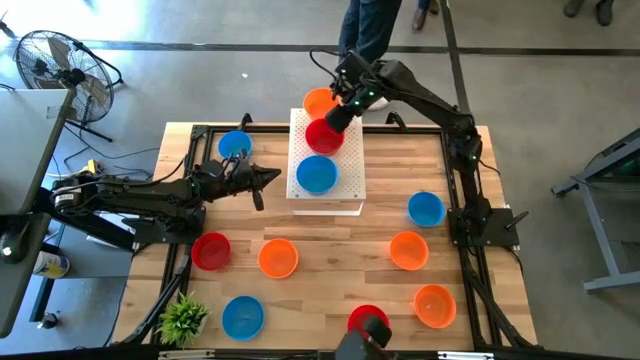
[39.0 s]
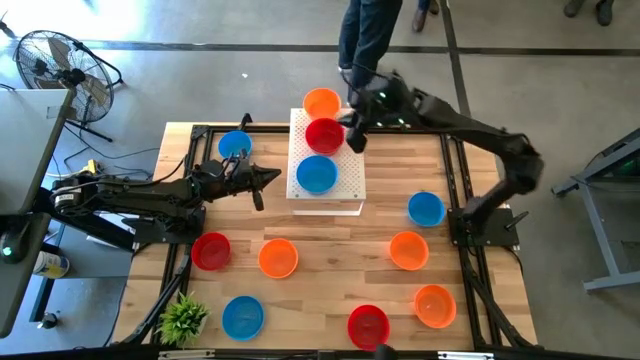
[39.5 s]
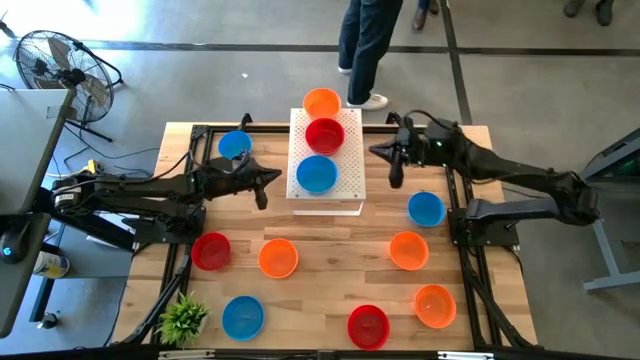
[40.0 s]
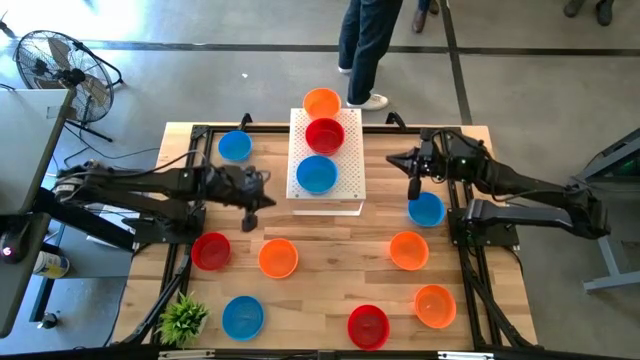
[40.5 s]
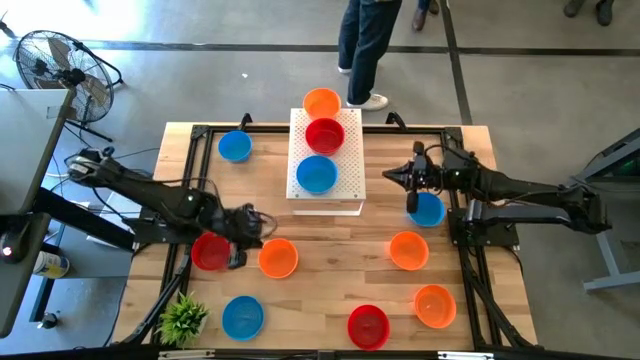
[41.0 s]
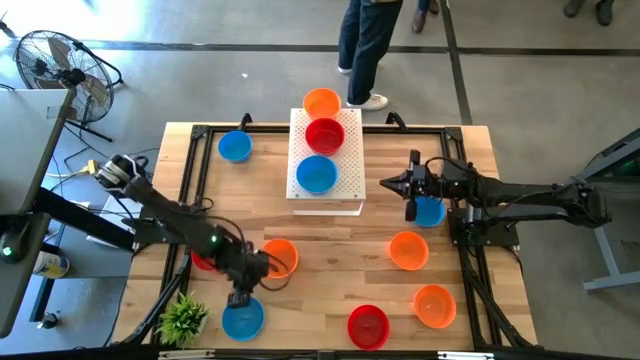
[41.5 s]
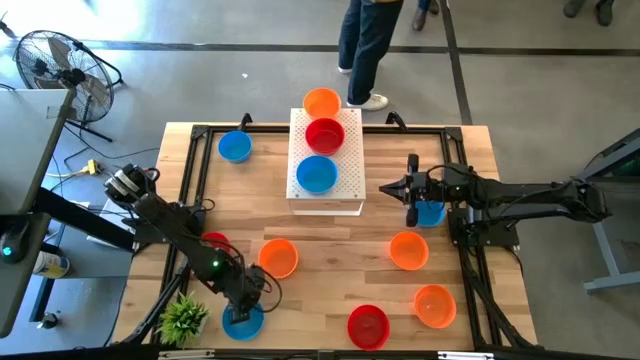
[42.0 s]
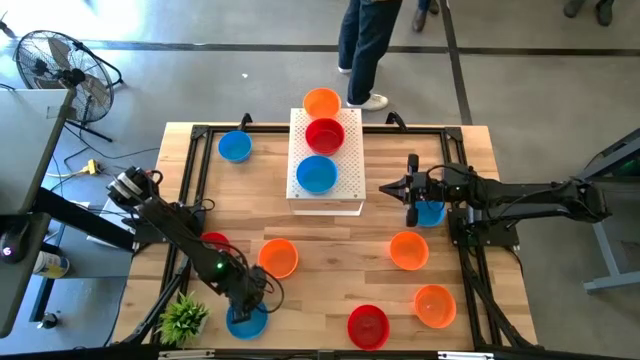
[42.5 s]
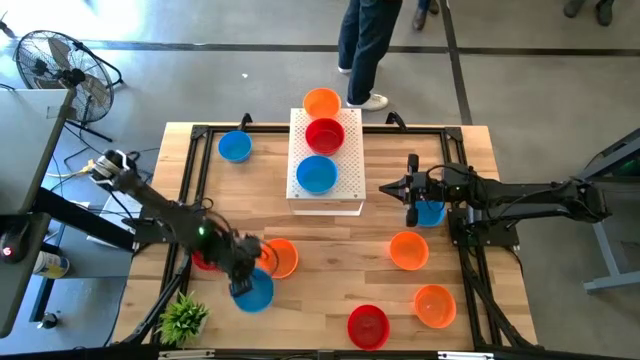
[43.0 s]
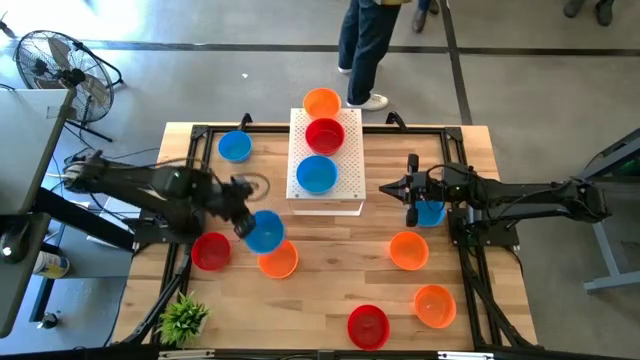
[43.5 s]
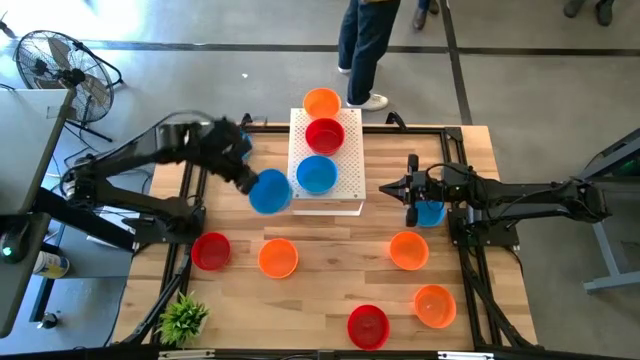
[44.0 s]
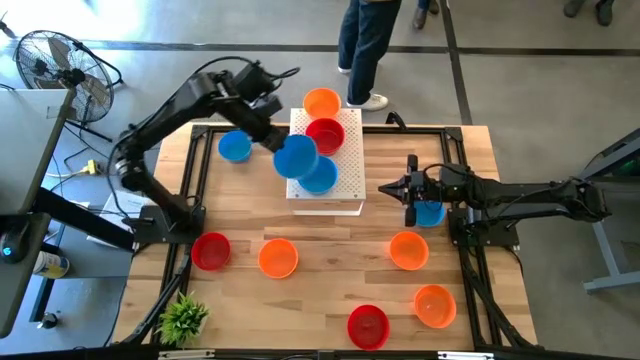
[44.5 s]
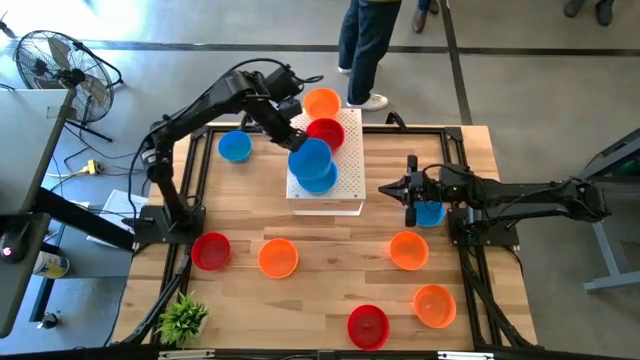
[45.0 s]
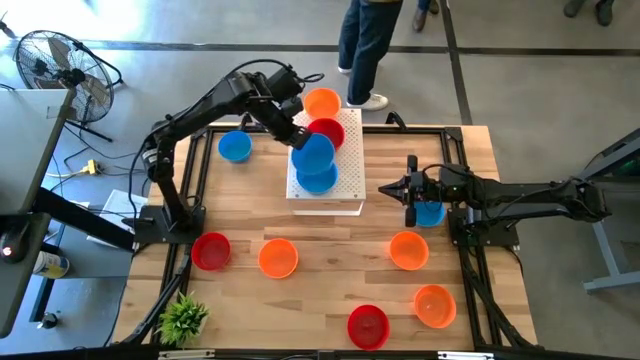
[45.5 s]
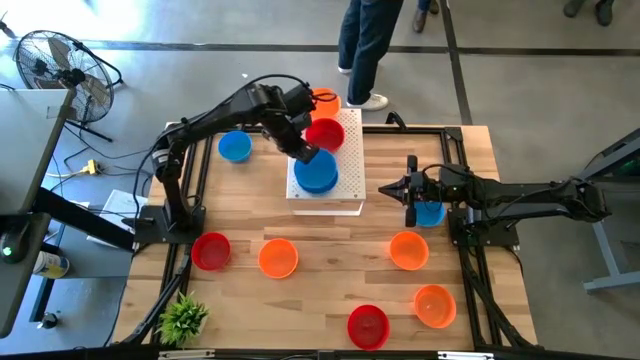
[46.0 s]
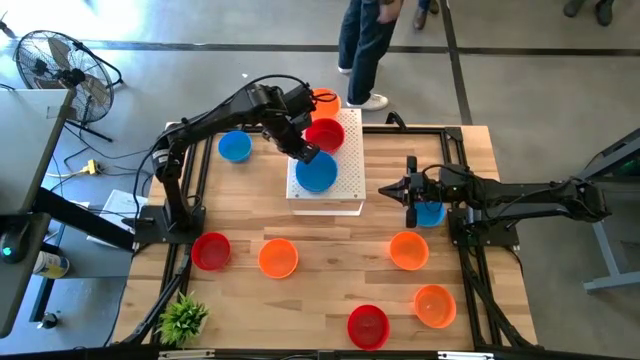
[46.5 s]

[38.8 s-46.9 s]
Task: Pick & Place Mini bowls
Stack the blue bowl on top of the other blue bowl on the shelf

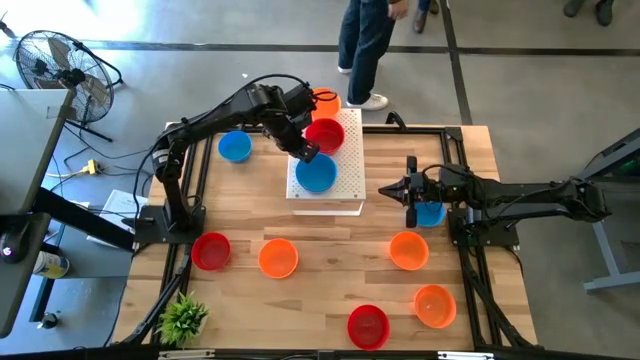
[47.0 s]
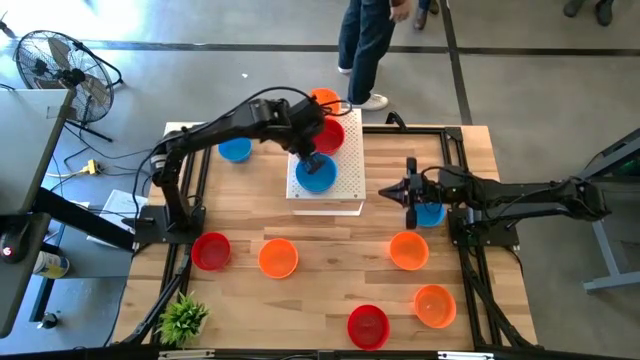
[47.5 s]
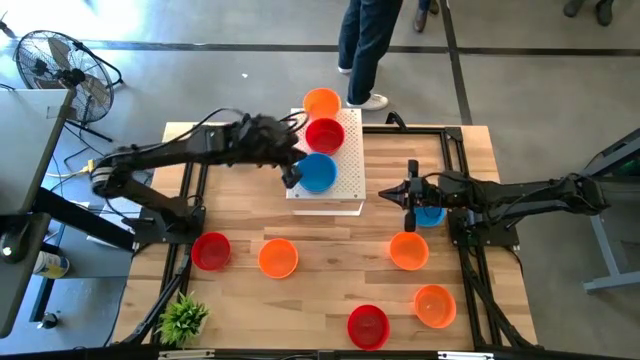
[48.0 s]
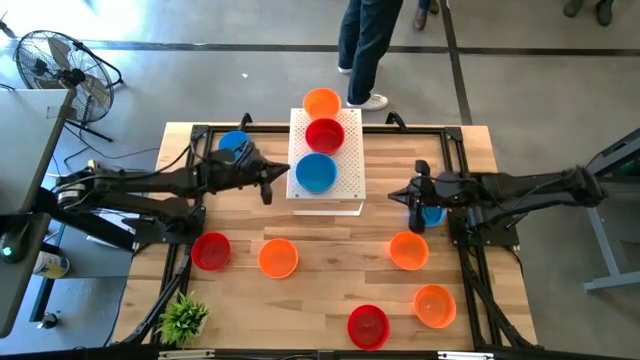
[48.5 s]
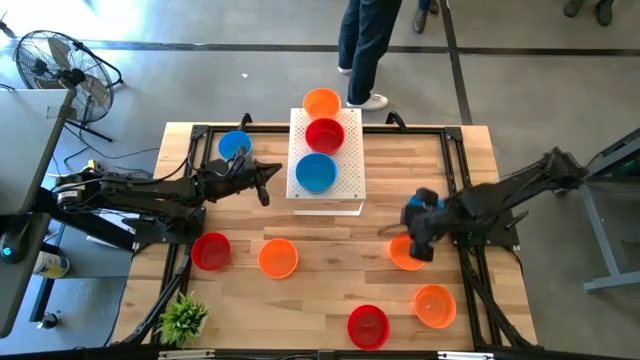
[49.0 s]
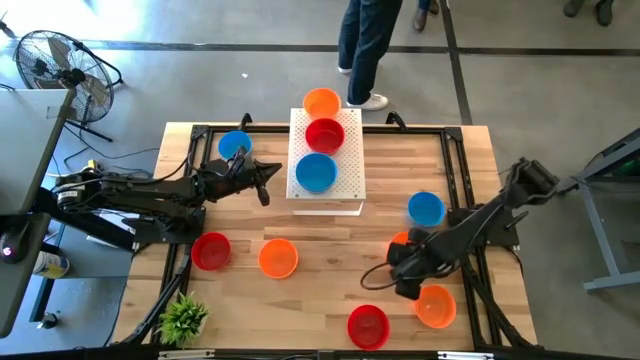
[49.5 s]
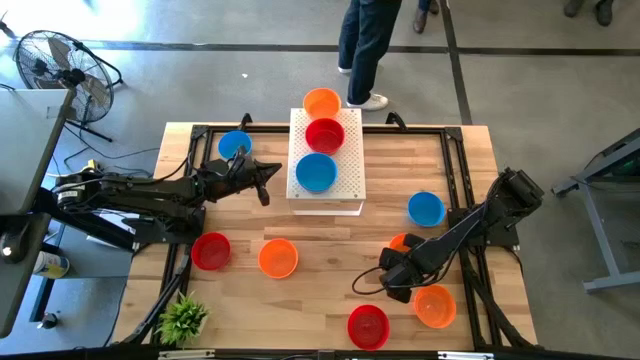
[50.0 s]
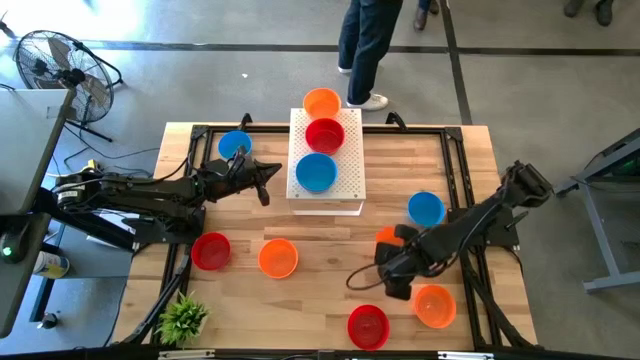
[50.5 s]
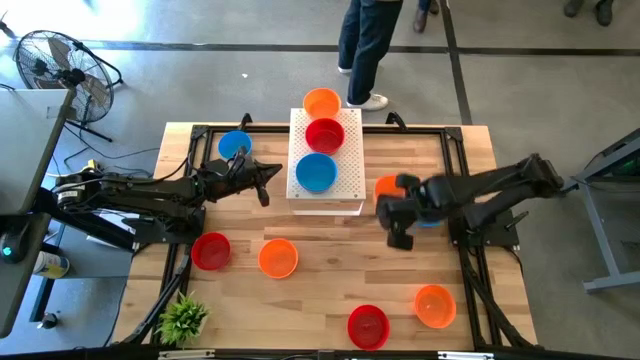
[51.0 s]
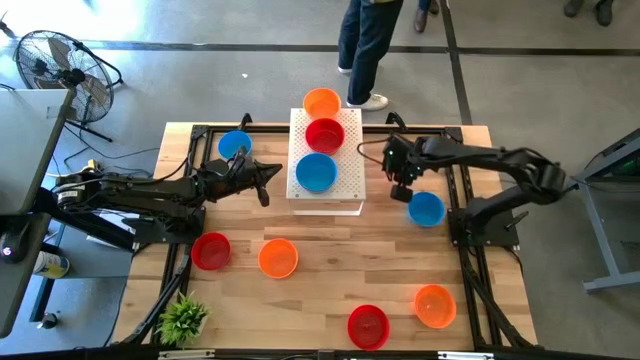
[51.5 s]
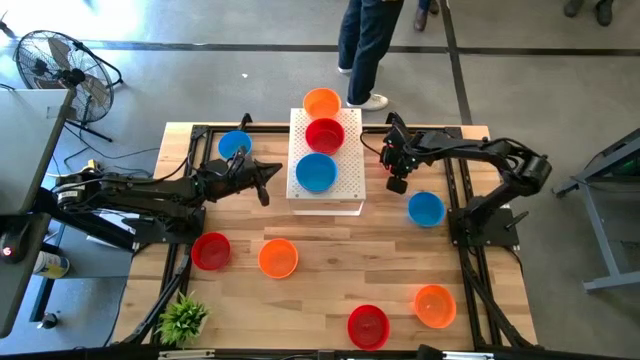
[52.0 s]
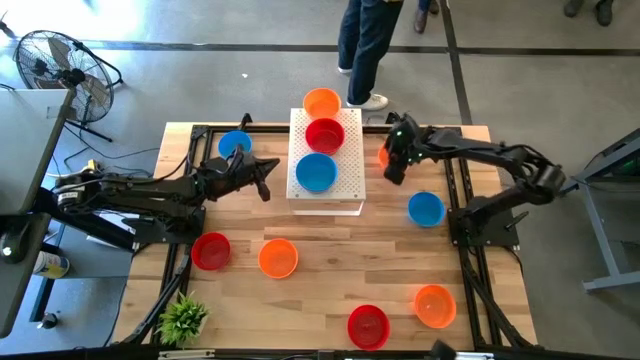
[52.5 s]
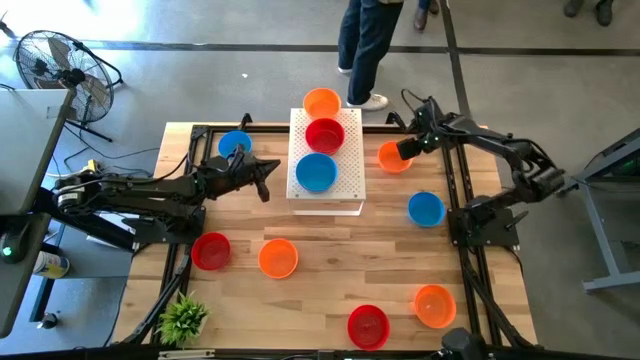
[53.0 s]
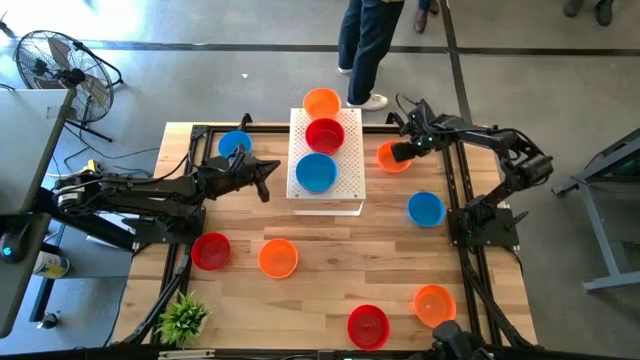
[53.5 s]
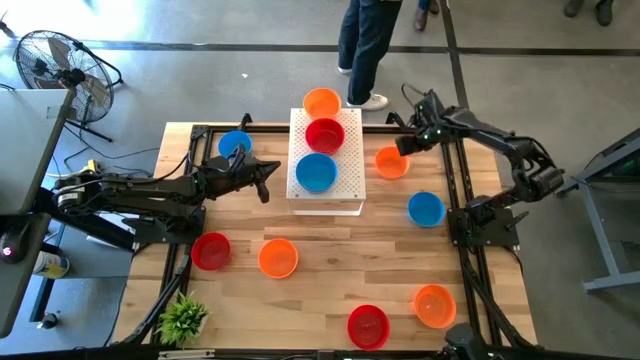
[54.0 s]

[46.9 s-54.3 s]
Stack the orange bowl on top of the other orange bowl on the shelf

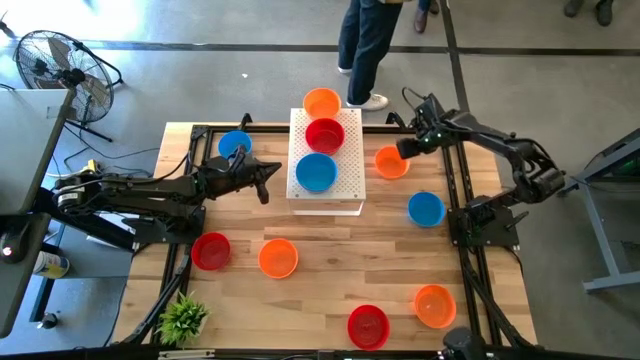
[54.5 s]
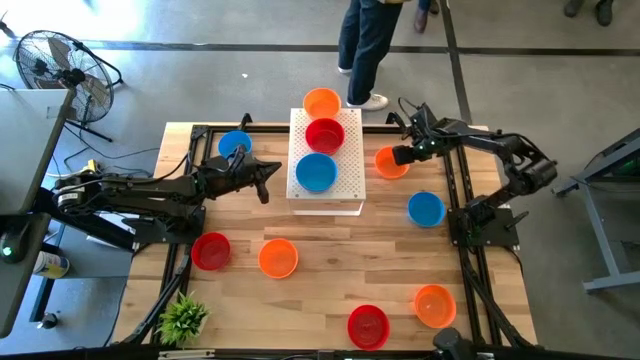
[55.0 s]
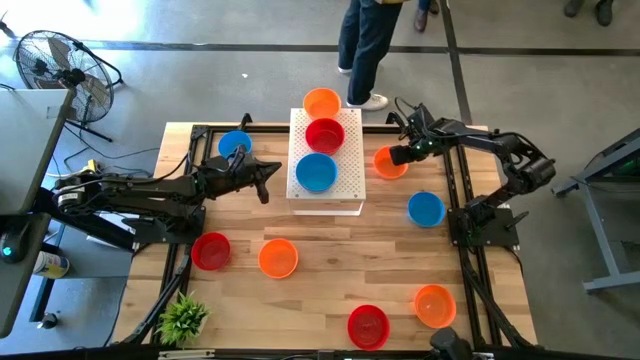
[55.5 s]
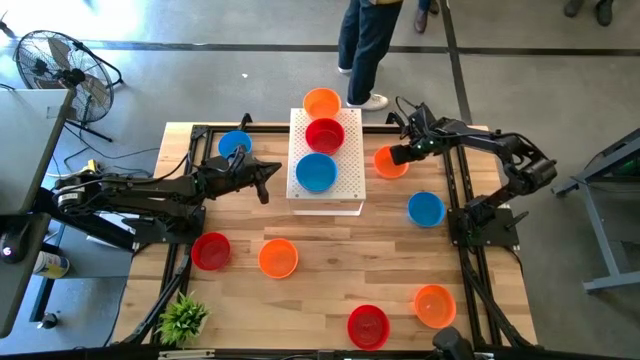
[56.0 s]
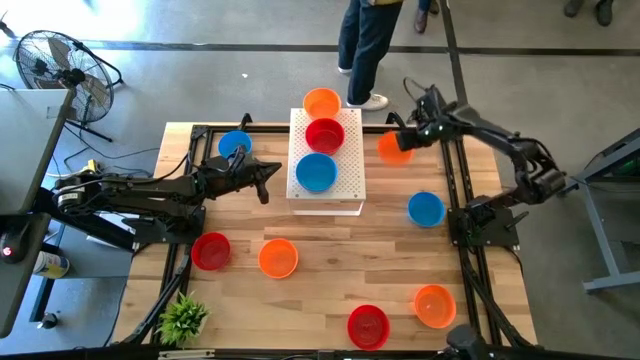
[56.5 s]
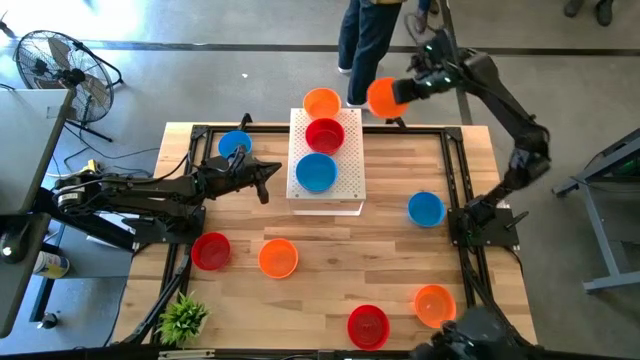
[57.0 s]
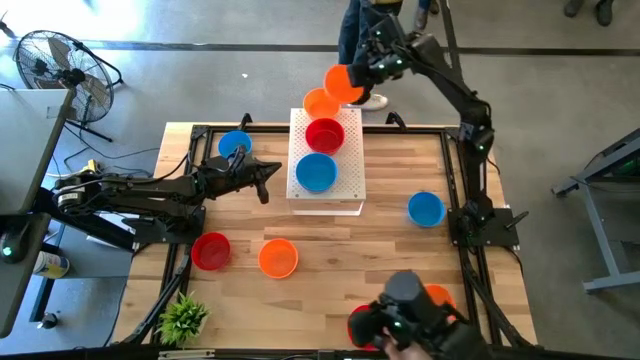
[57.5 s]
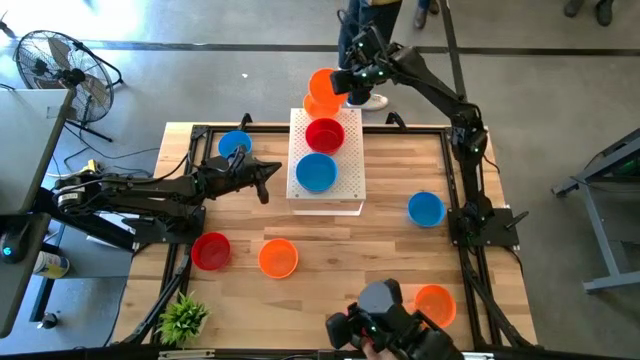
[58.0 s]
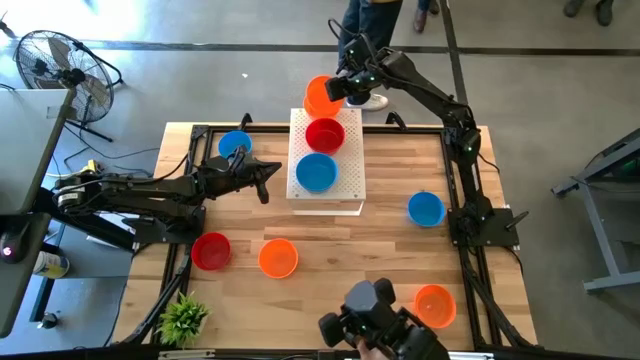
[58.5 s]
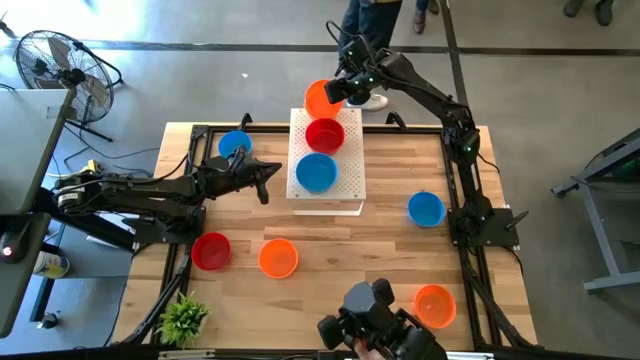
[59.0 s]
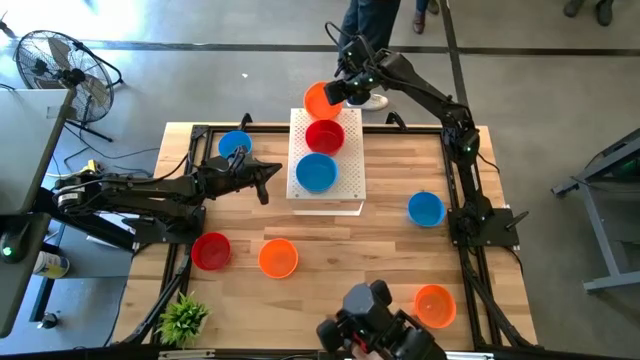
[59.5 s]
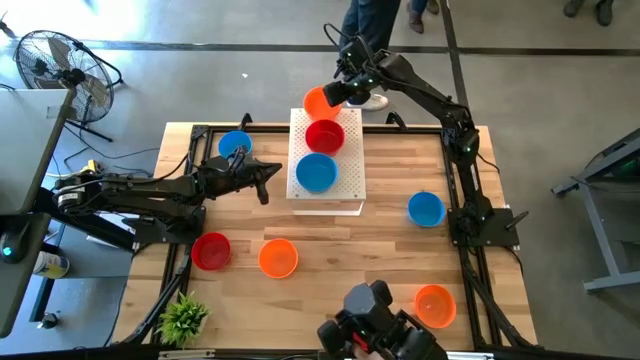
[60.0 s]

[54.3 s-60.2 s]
Stack the orange bowl on top of the other orange bowl on the shelf
